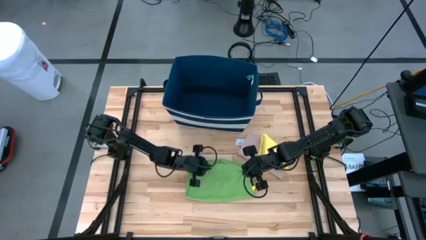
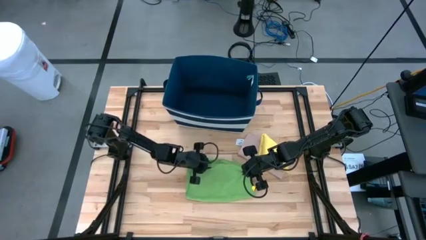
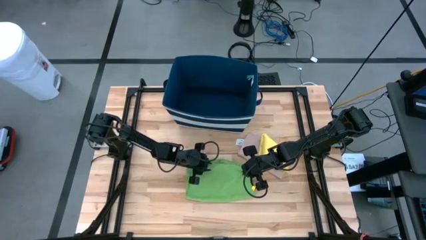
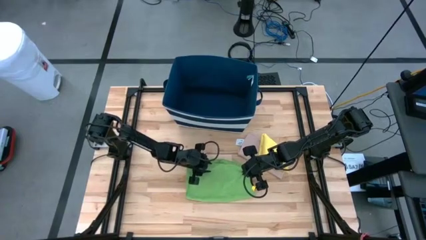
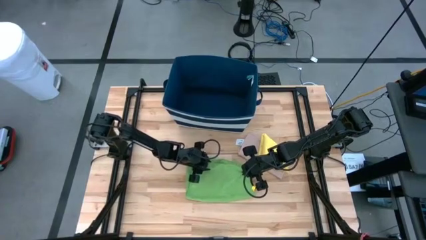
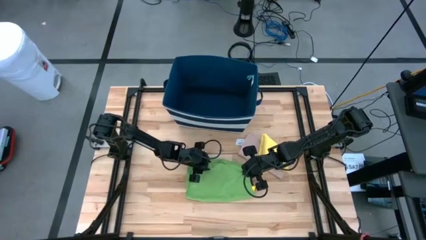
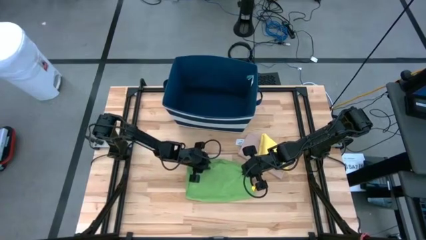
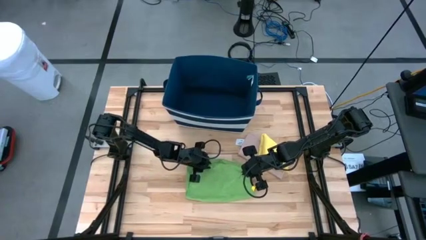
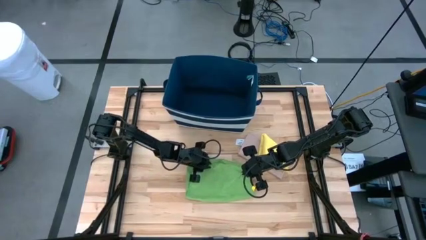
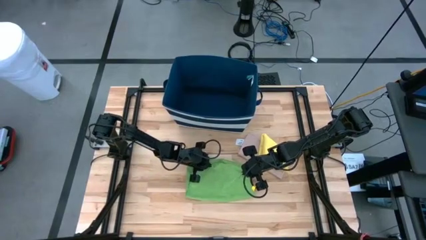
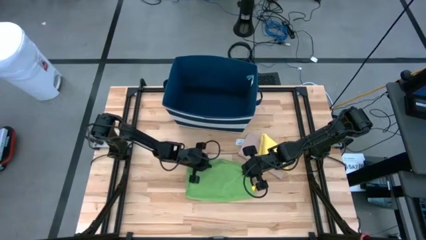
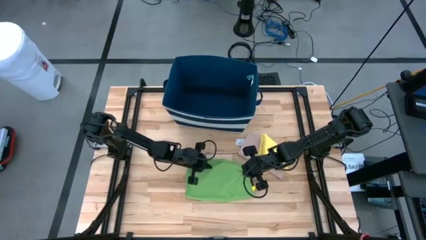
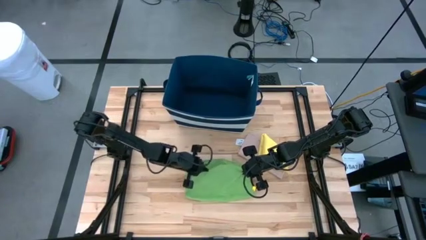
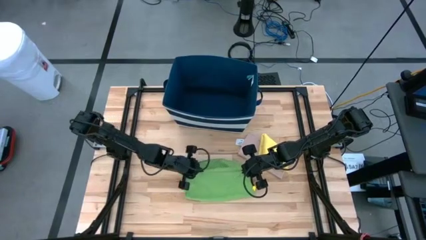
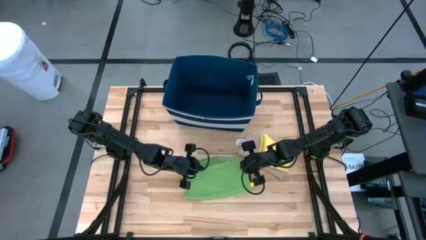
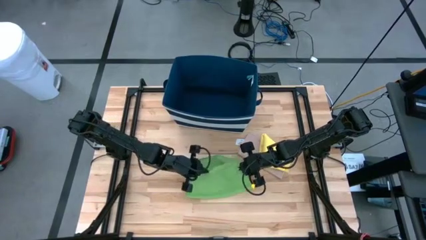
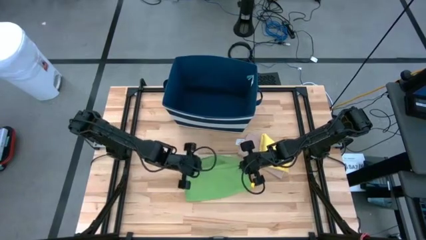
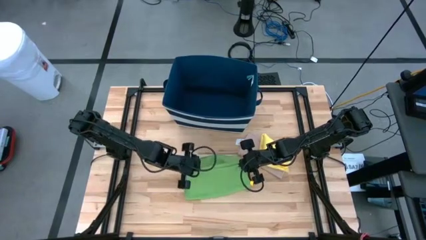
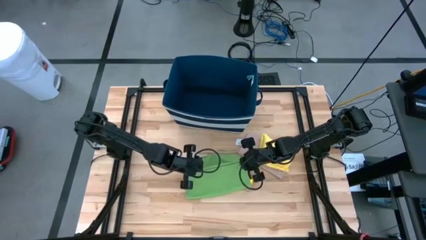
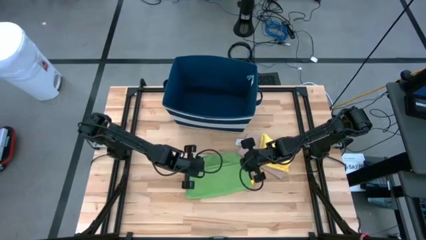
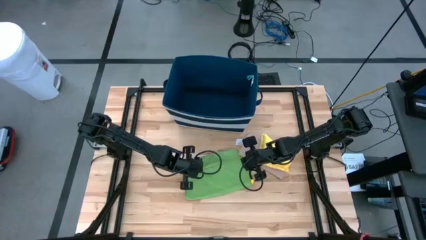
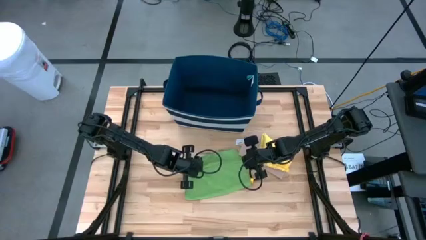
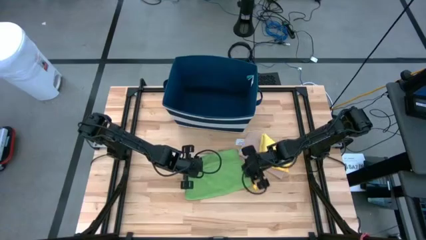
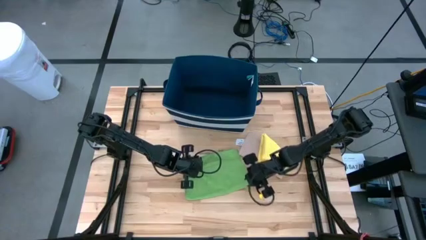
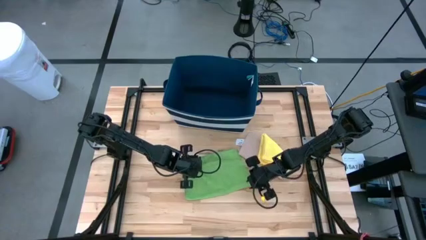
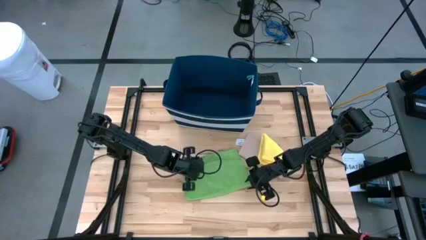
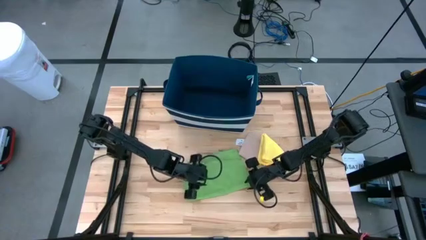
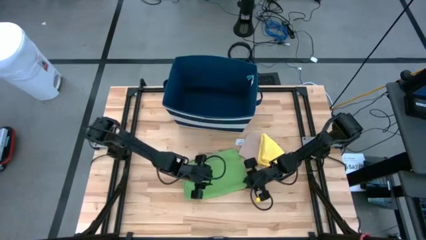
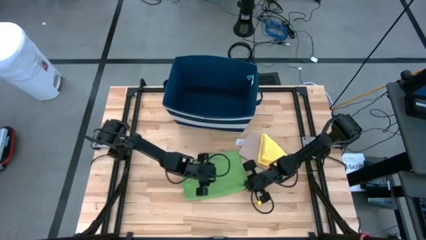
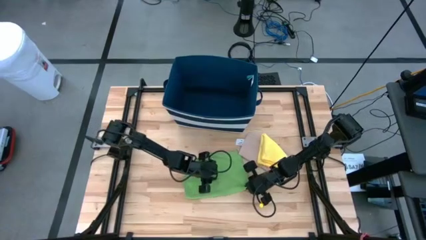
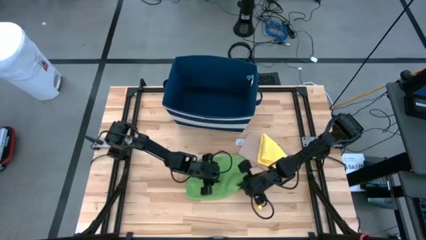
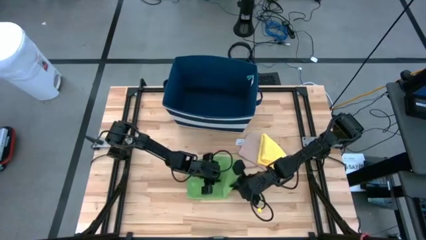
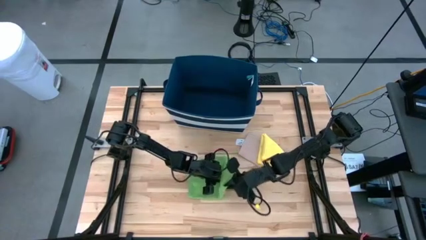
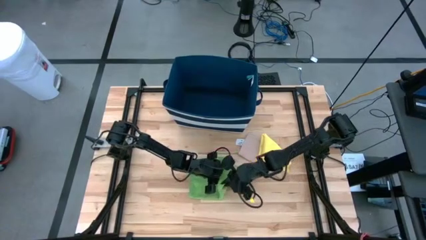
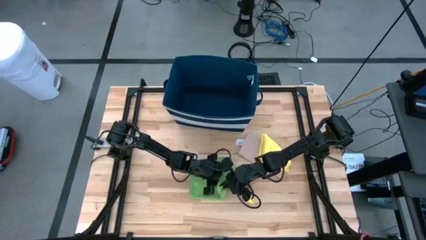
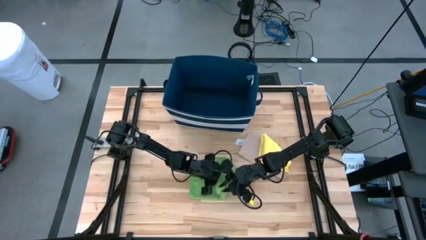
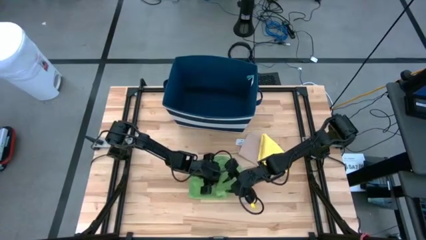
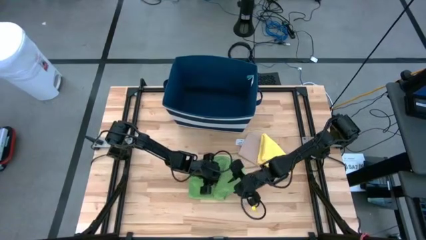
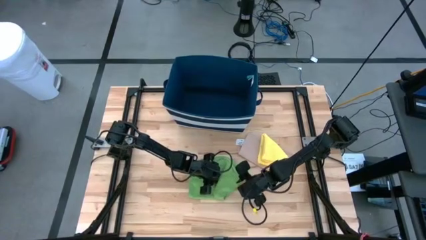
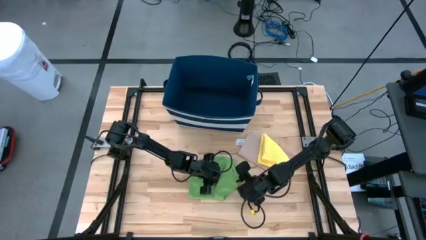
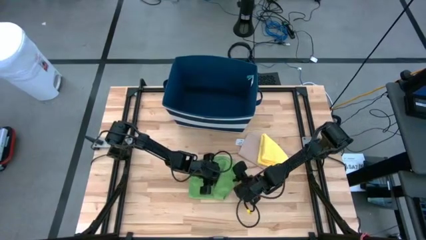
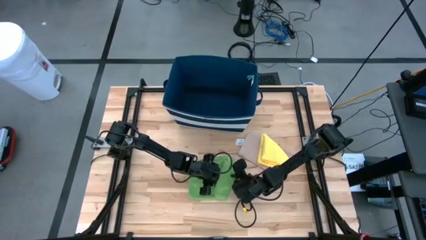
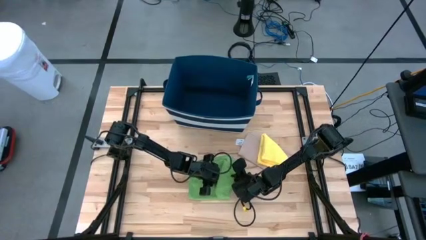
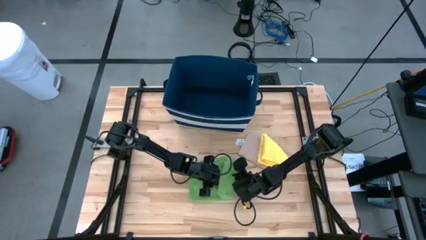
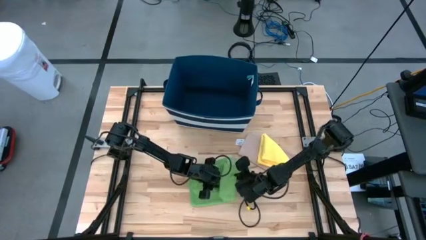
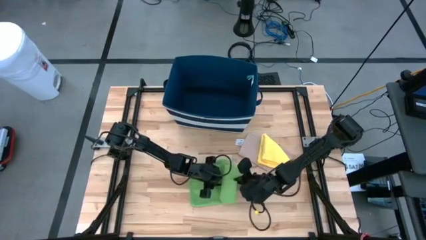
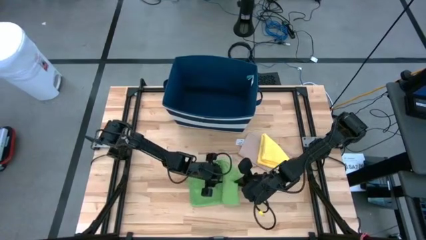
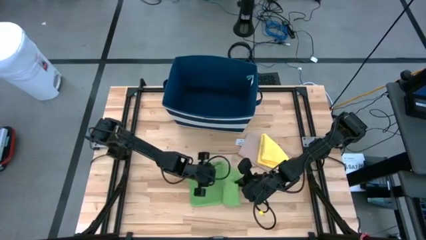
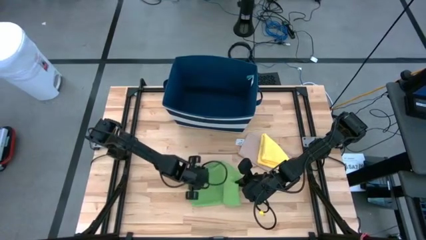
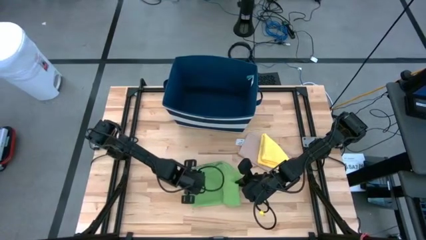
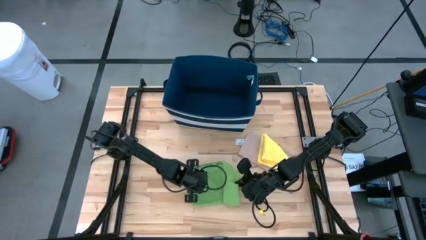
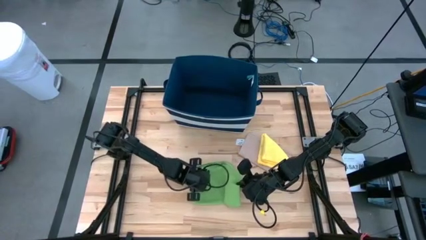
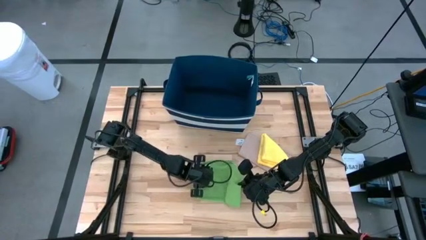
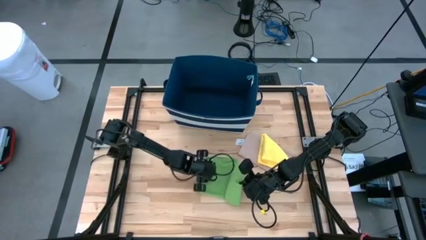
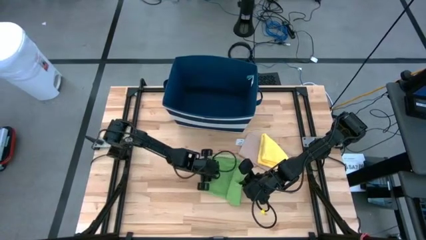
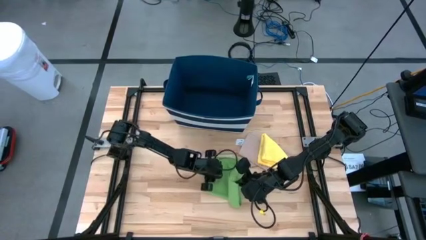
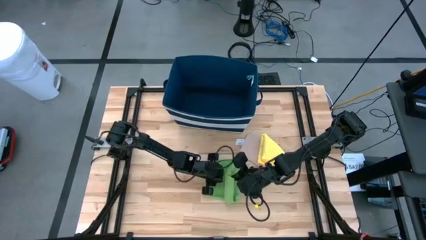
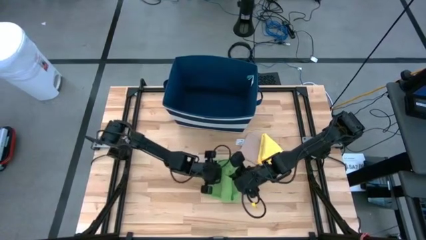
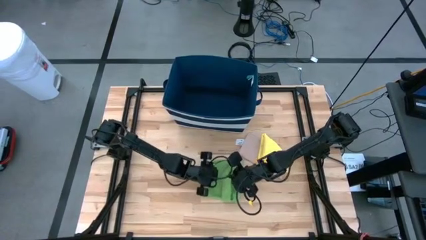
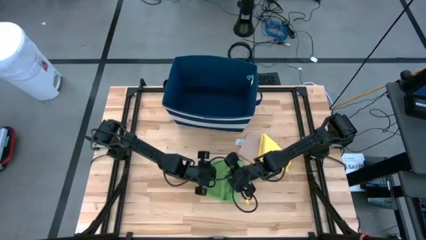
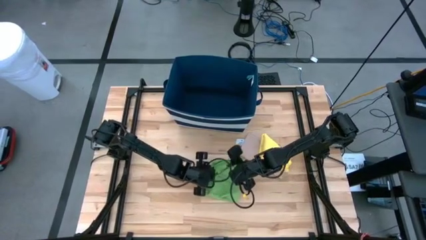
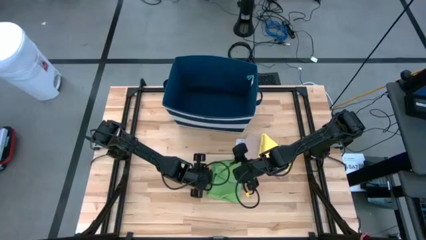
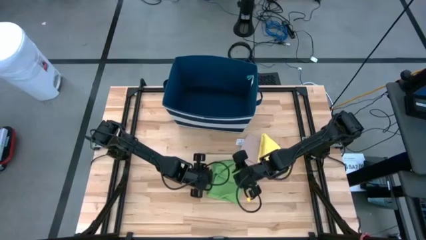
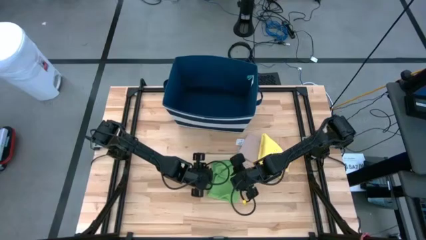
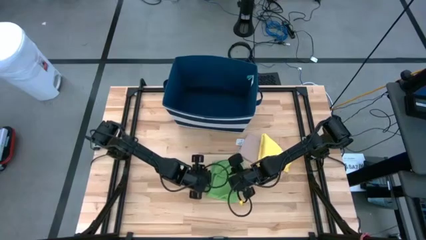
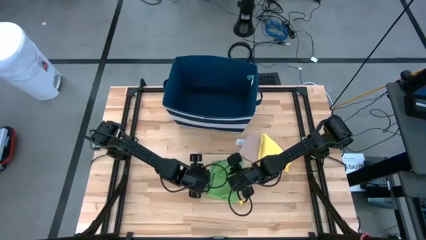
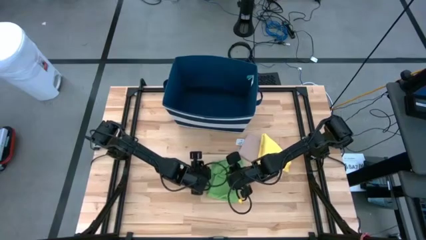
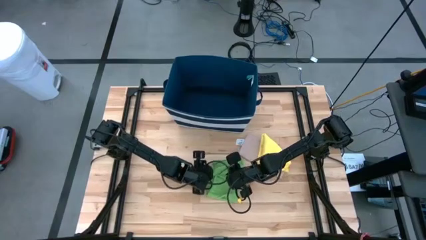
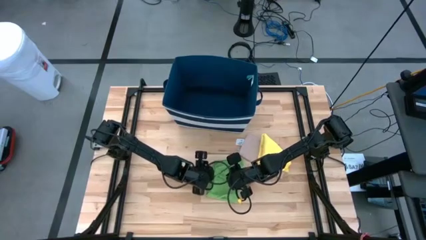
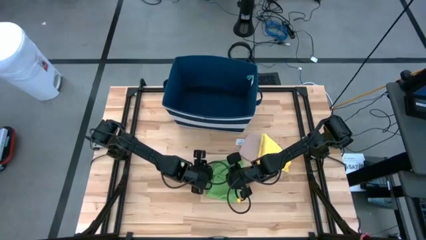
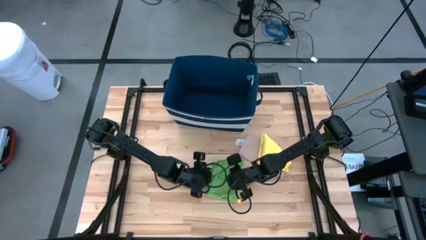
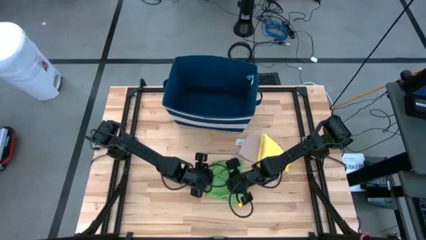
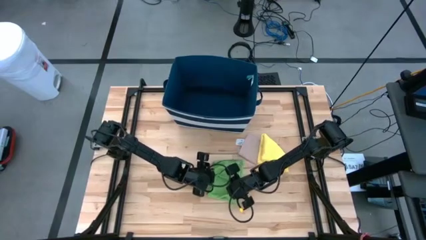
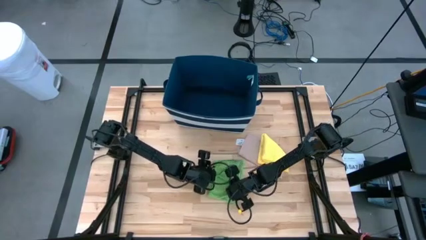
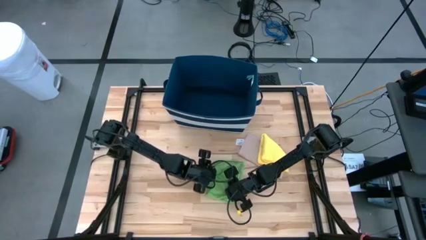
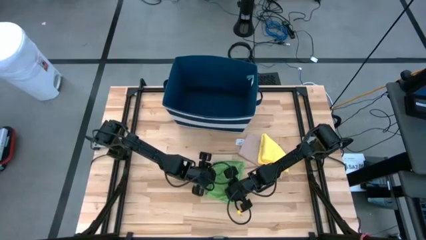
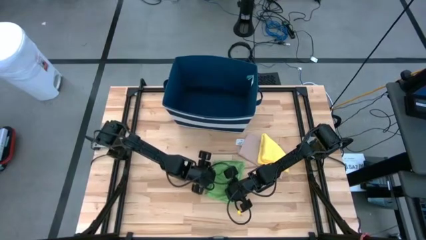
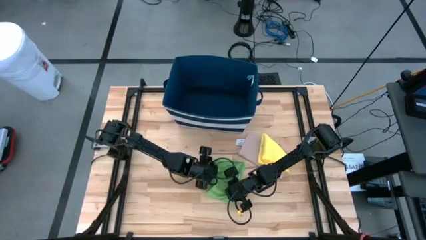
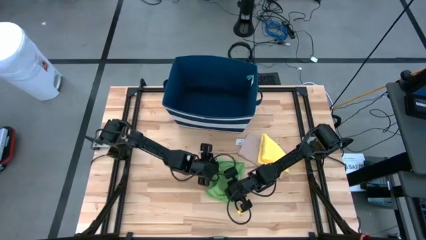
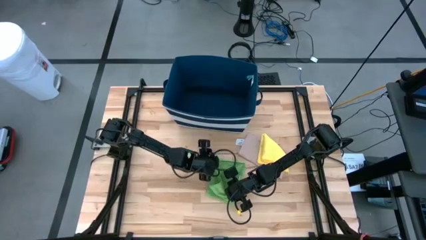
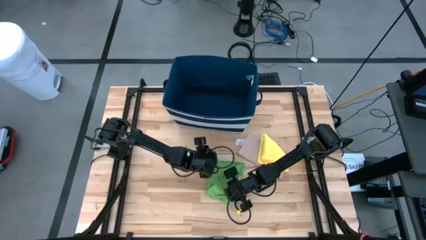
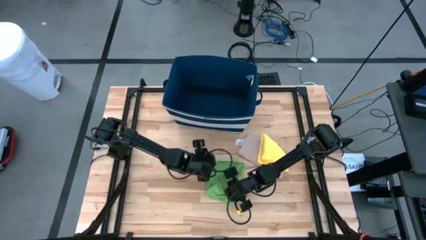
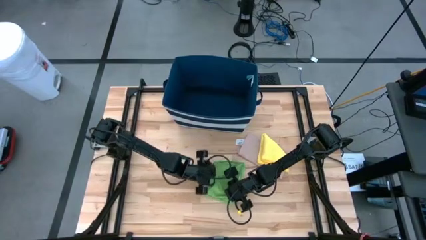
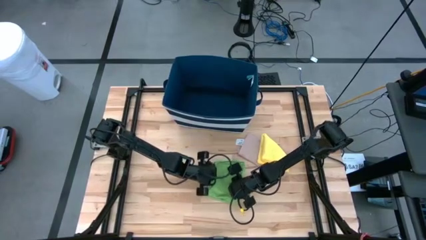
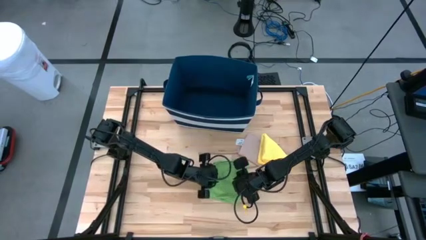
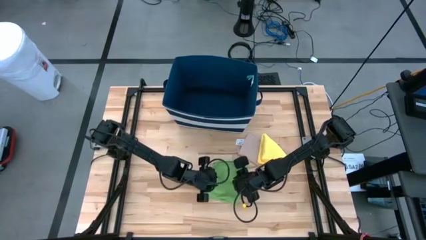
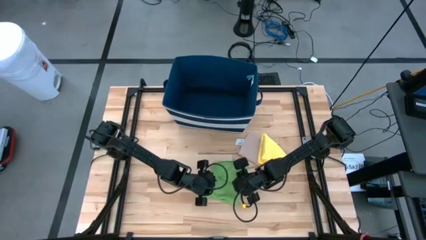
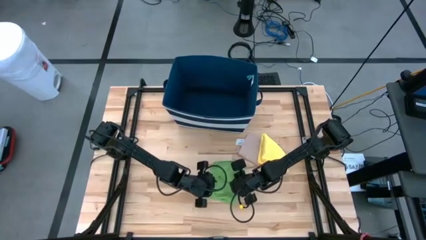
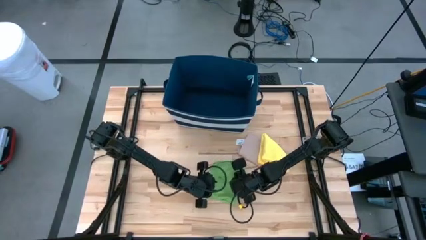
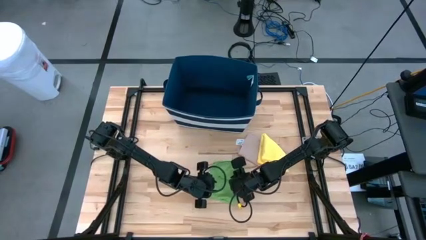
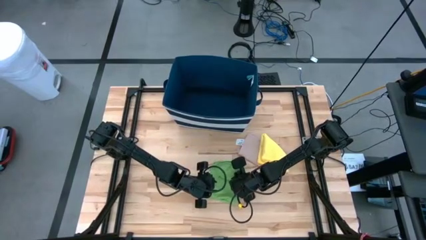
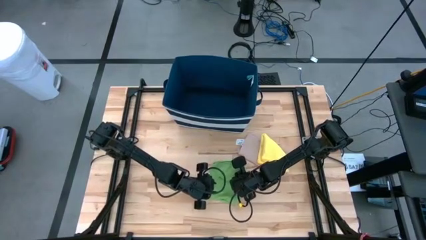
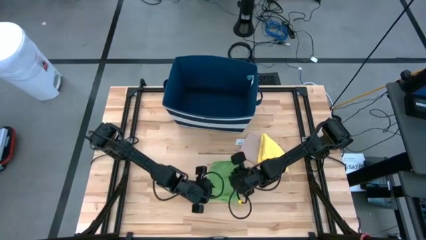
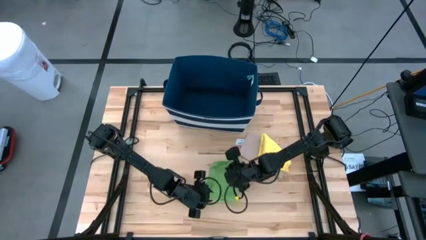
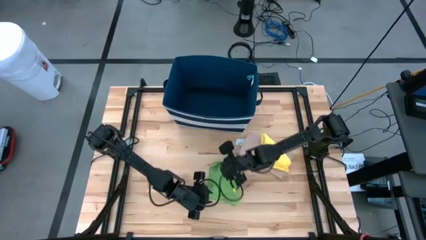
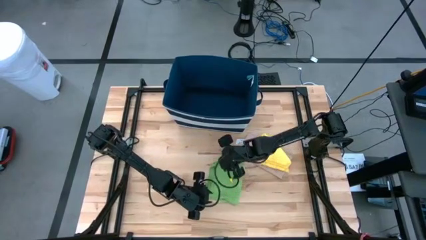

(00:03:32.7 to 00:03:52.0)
Task: Fold towel
Fold the green towel
